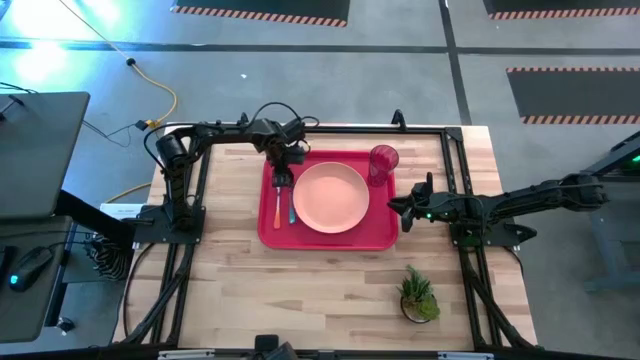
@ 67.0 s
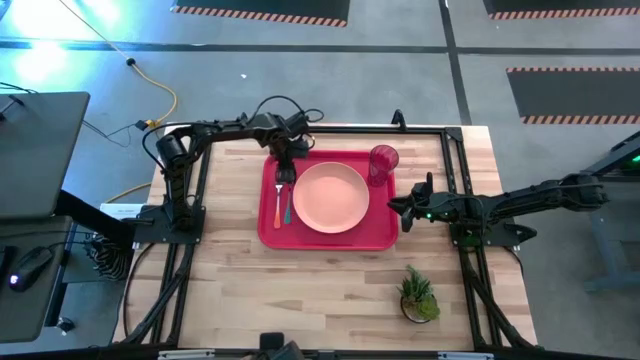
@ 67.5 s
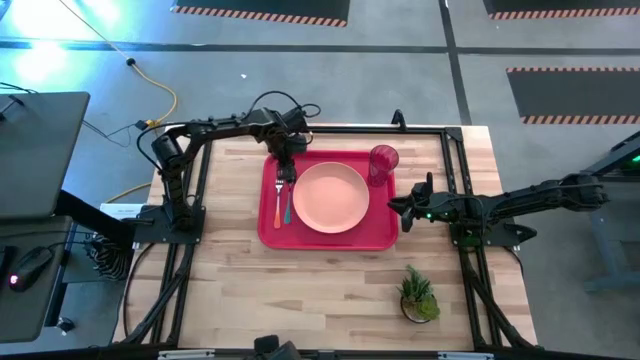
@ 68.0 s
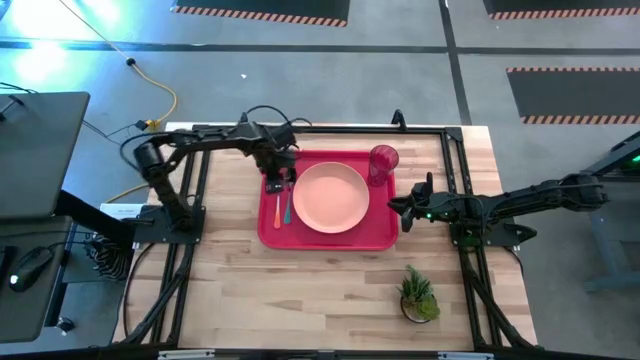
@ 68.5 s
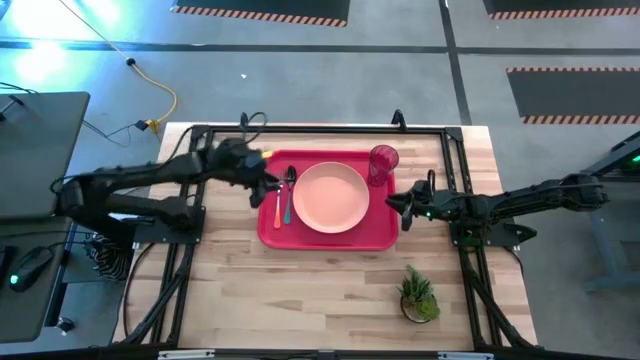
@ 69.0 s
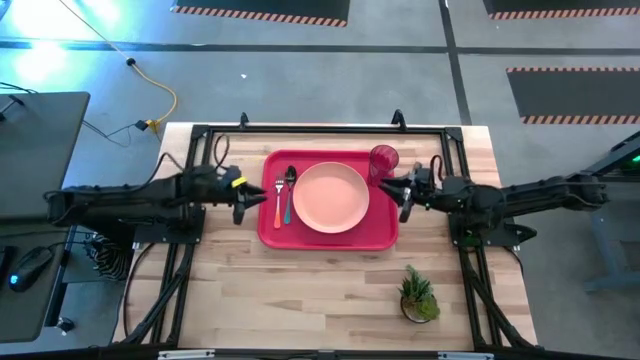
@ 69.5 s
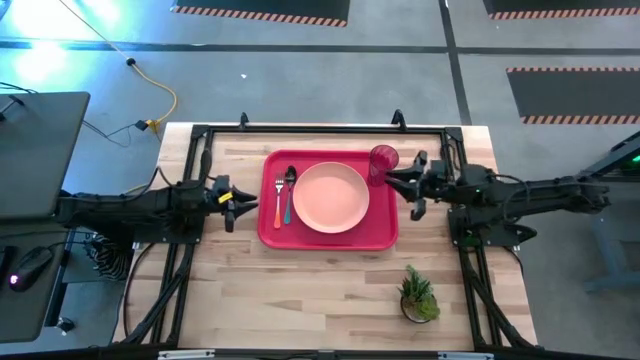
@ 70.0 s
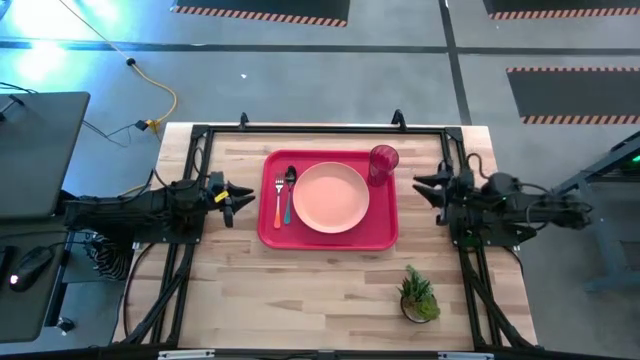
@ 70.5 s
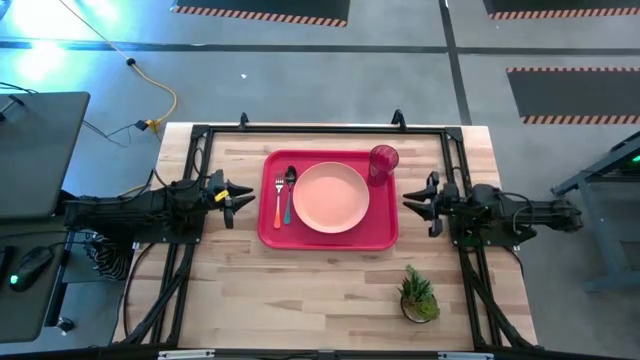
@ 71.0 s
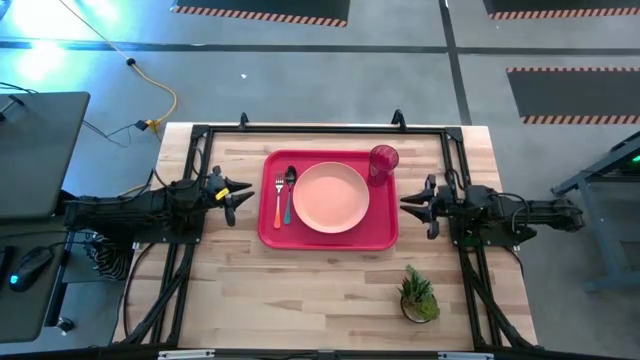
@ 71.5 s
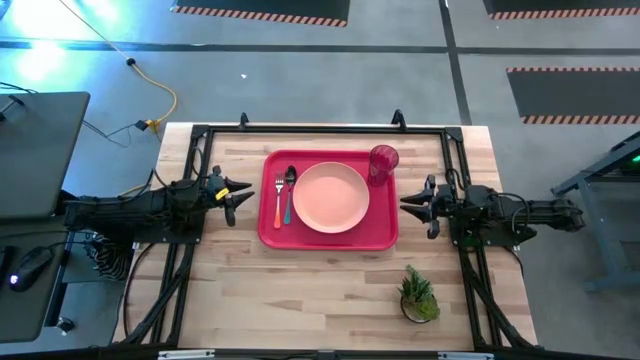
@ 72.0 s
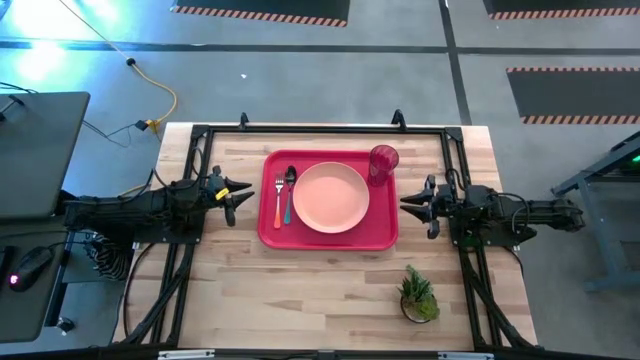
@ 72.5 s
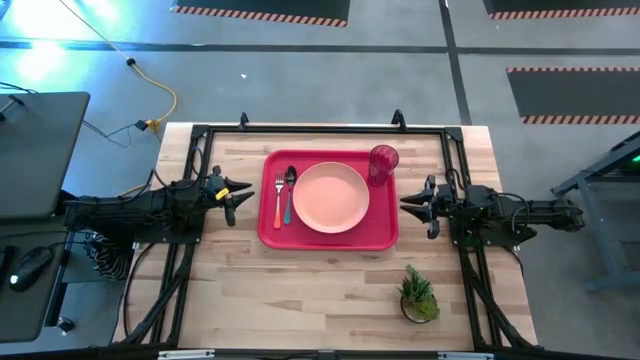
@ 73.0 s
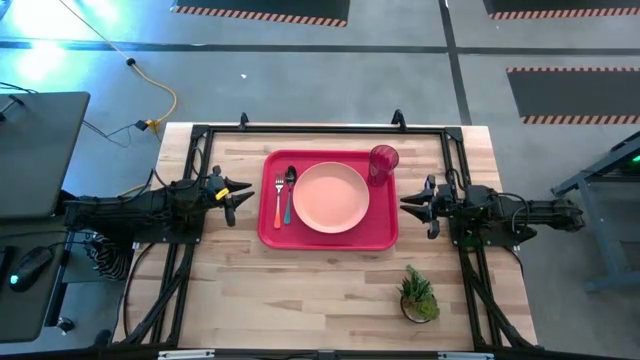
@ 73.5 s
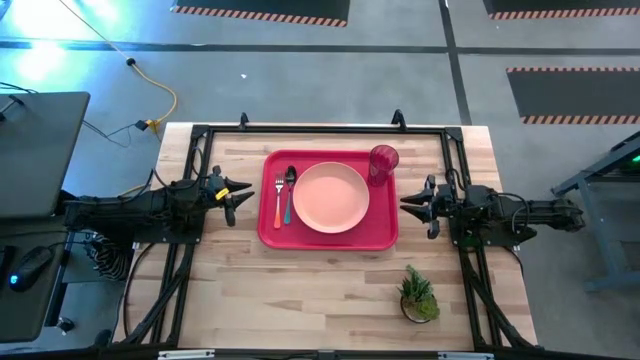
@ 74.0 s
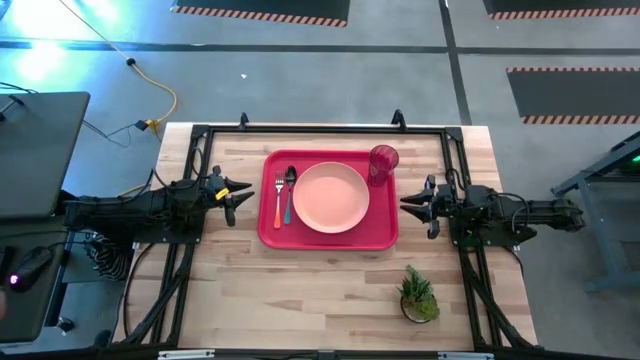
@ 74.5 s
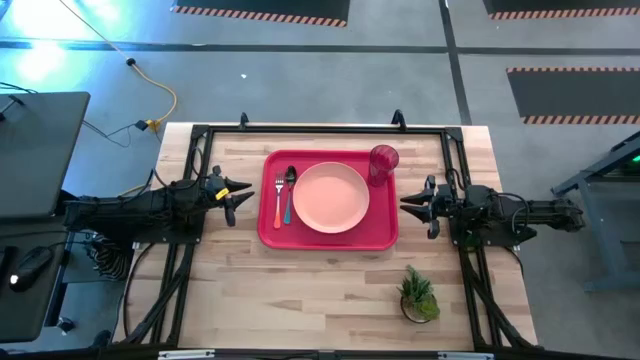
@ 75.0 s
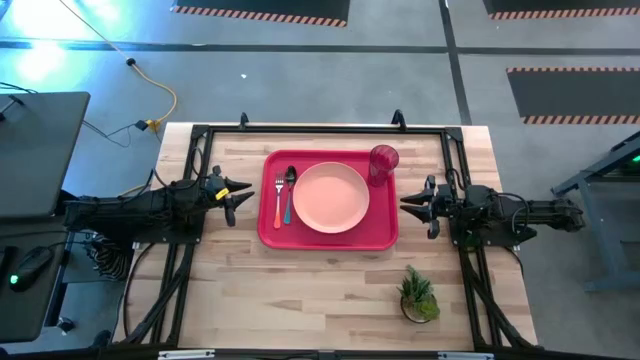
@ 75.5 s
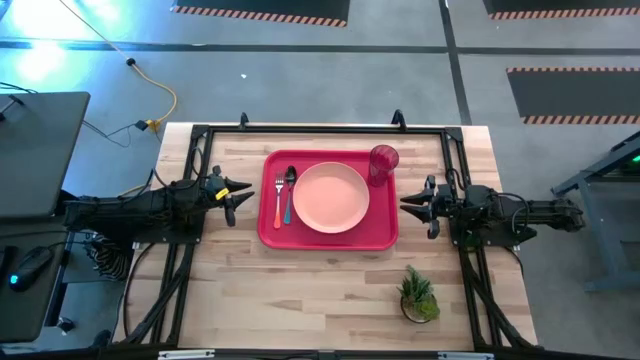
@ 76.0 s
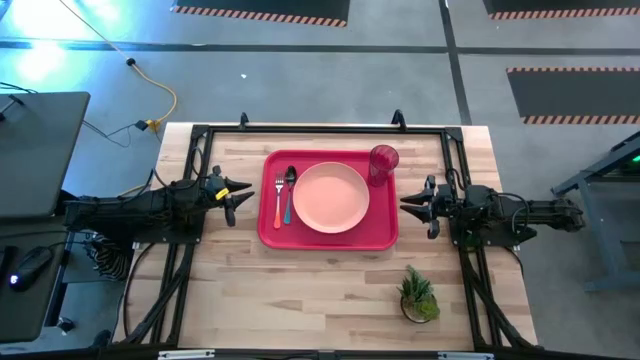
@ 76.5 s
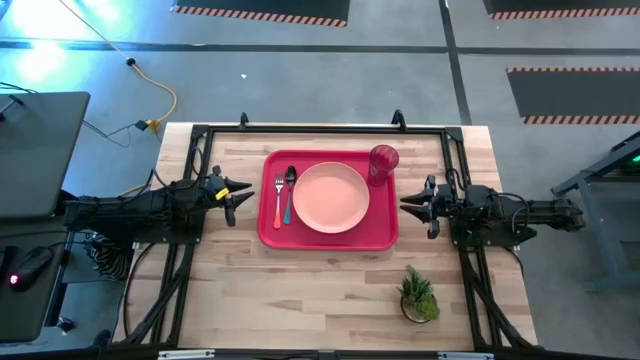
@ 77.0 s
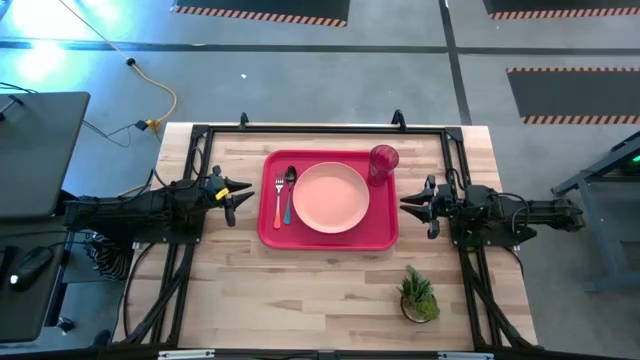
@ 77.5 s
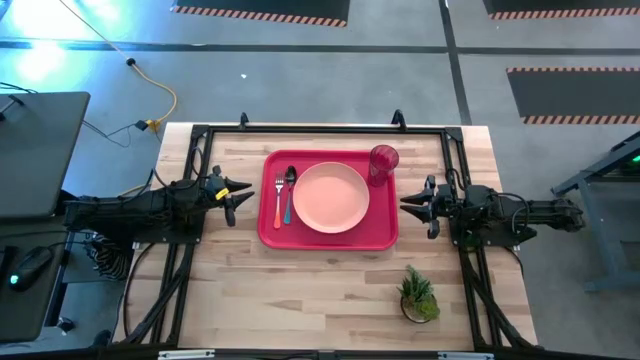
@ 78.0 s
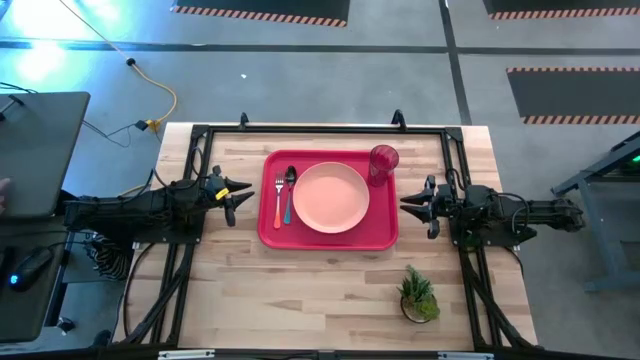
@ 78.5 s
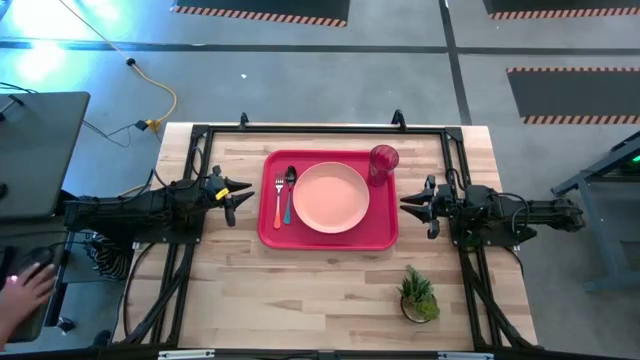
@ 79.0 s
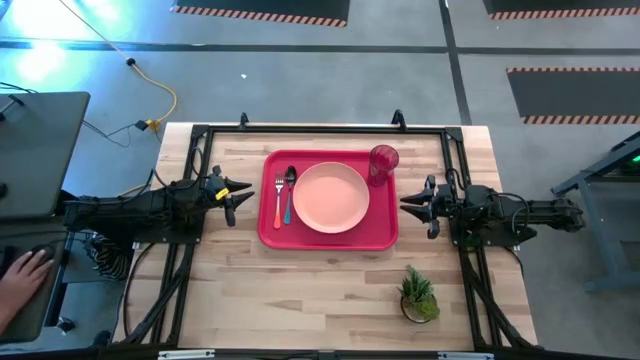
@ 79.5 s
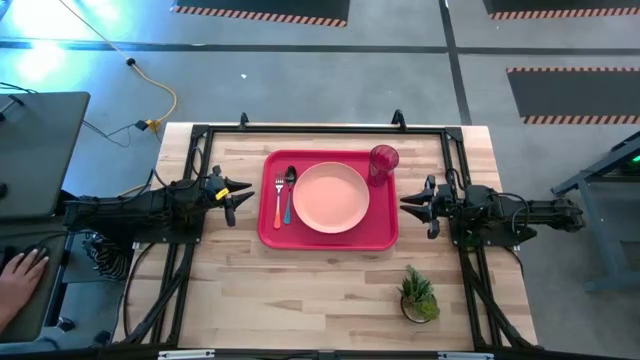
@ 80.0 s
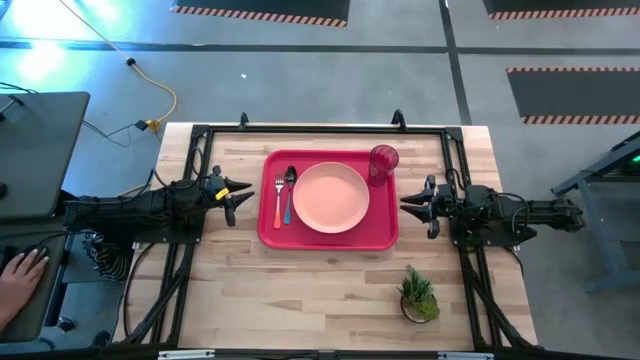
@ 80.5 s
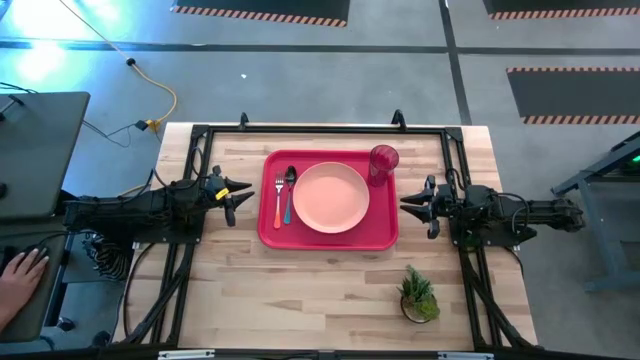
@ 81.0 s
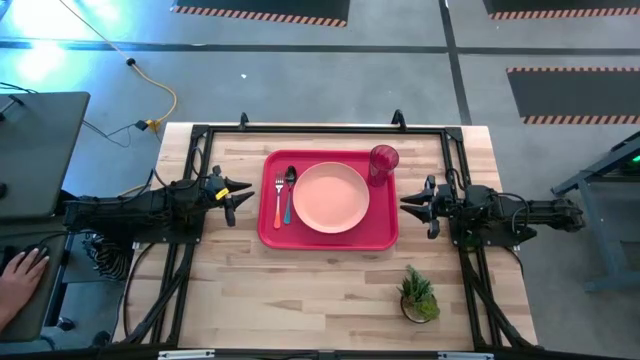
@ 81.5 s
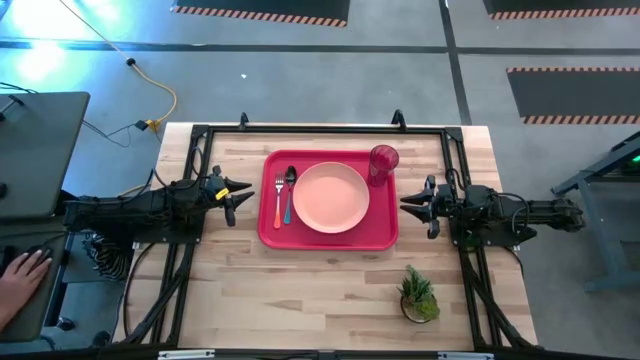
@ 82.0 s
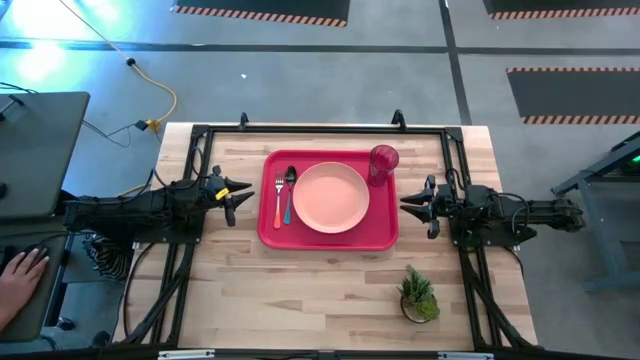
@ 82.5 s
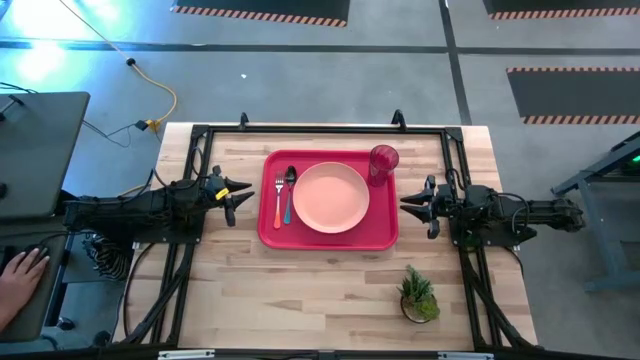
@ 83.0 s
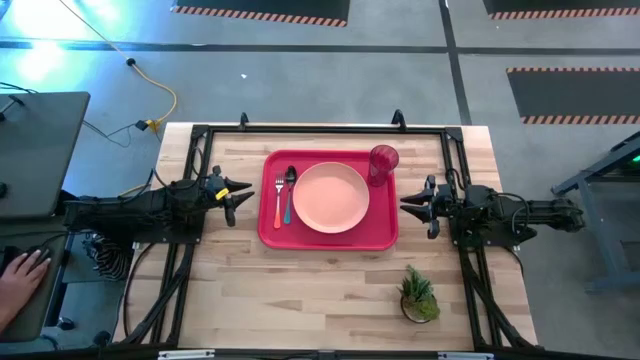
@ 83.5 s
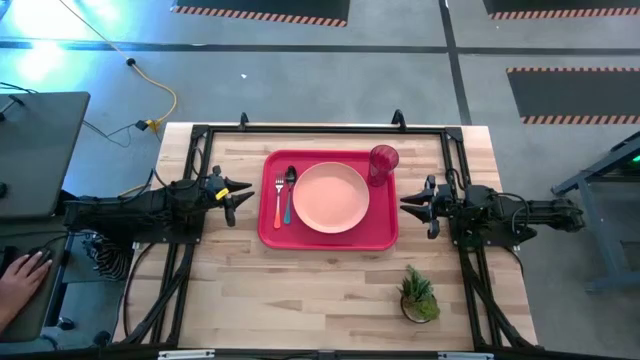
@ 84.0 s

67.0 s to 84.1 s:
Task: Pick and place plate/cup/fork/spoon on tray
Return to Home Position

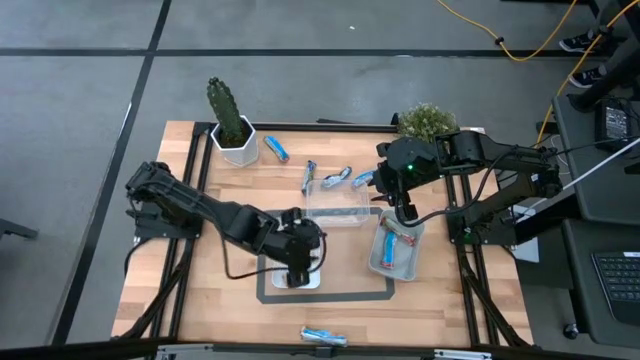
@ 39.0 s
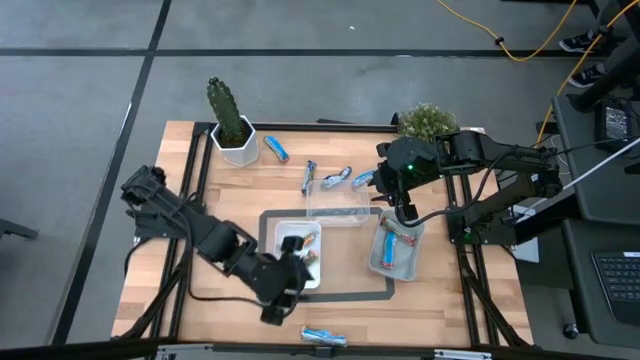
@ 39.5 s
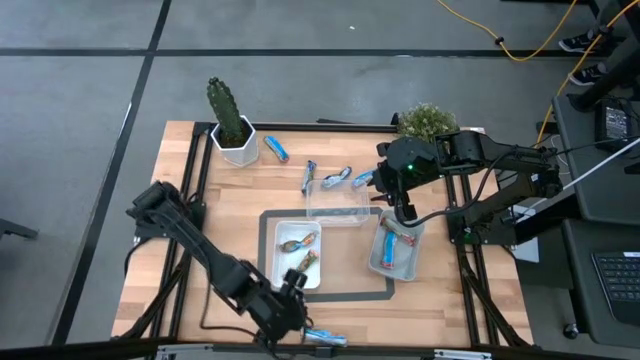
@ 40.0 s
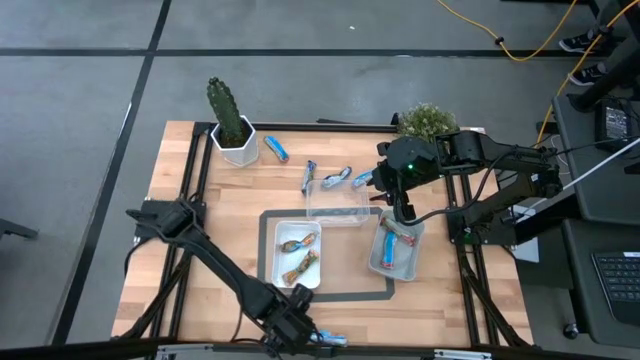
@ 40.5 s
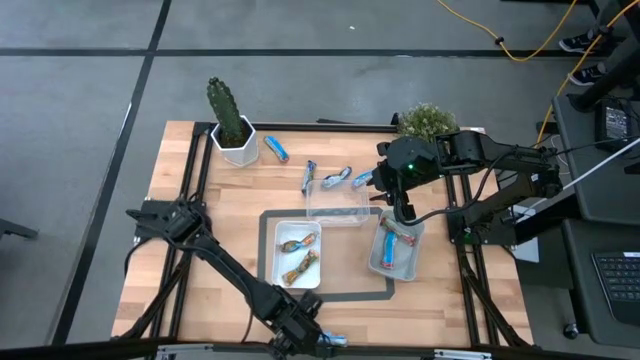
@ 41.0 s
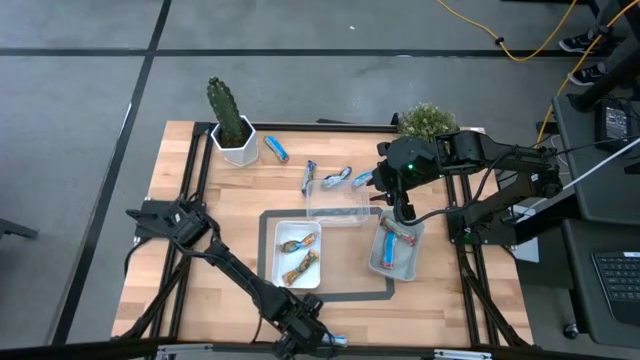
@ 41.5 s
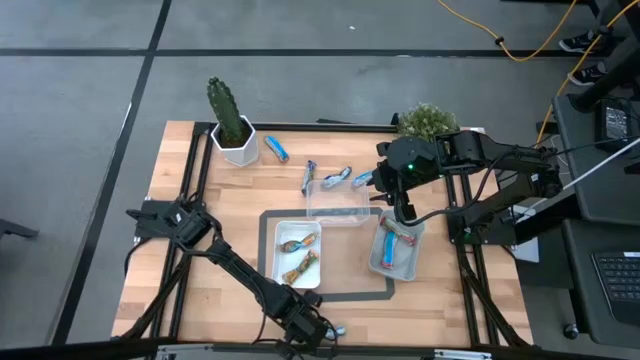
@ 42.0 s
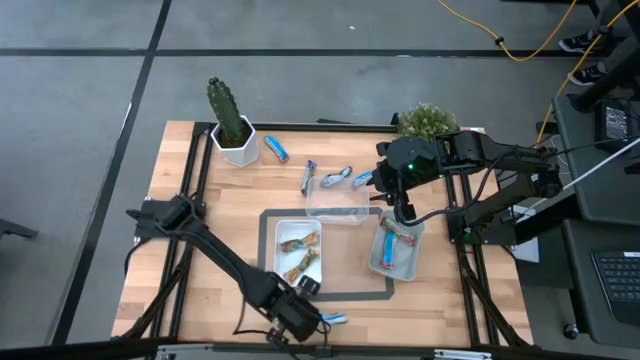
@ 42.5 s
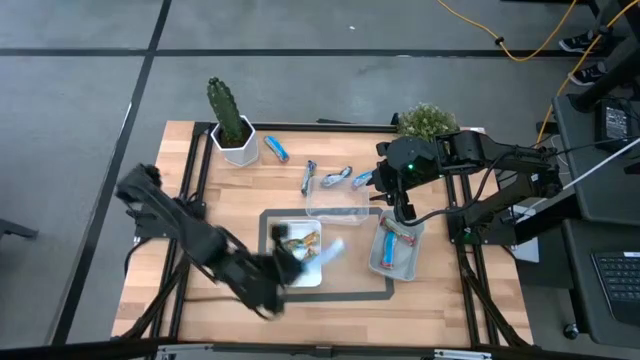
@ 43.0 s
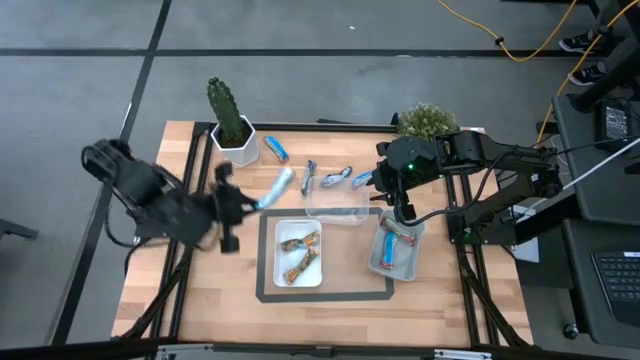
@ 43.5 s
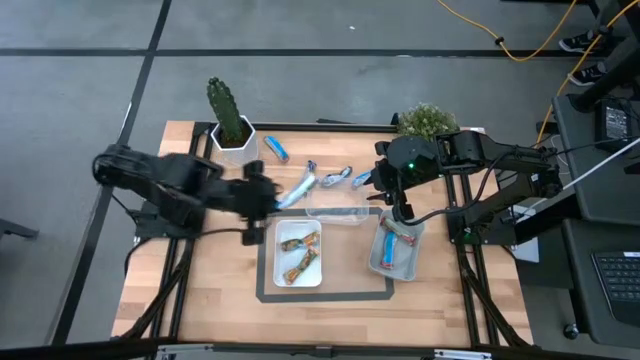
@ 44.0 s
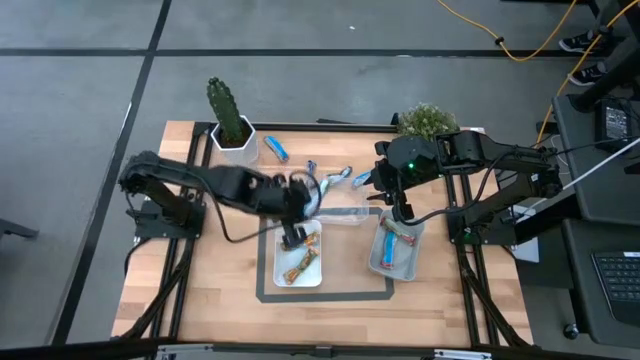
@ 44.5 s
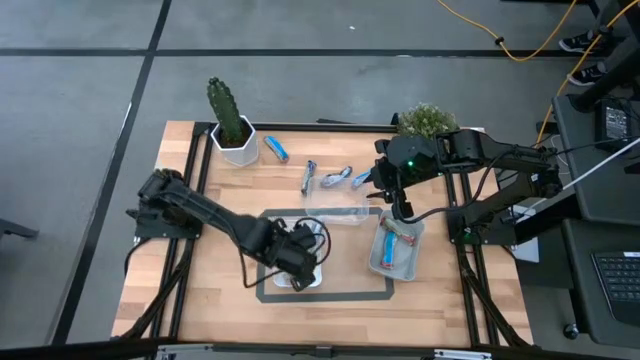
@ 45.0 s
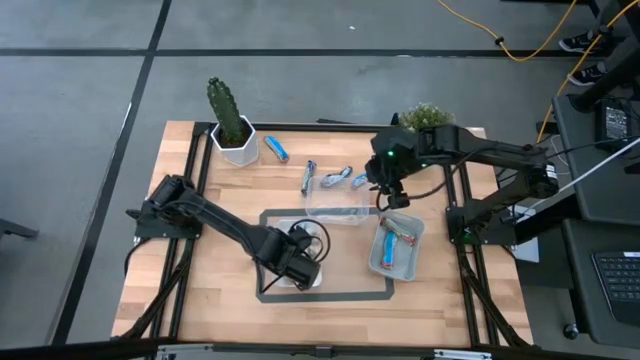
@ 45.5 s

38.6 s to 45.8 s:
Task: Pick and place Granola Bars by type
Put the orange granola bar into the white bin
